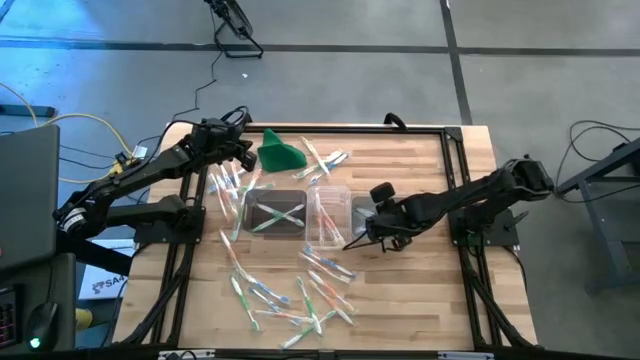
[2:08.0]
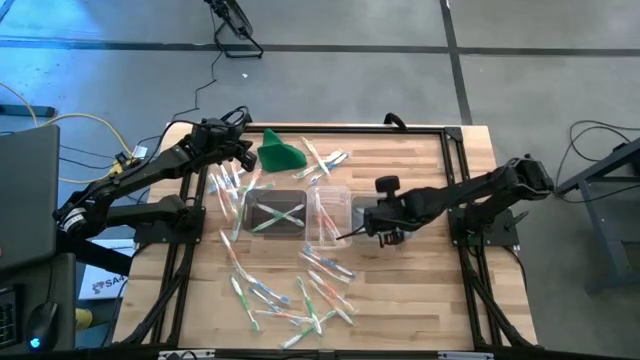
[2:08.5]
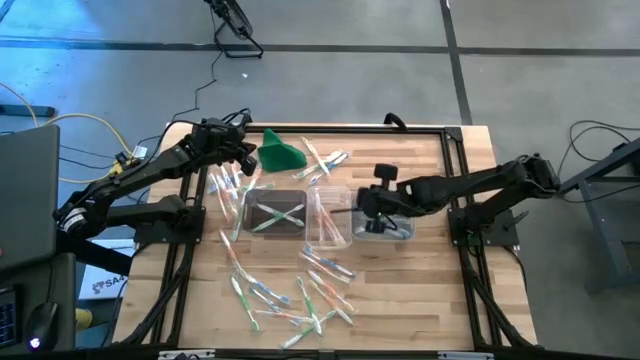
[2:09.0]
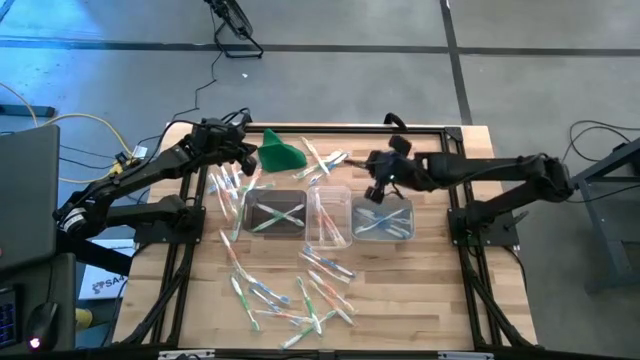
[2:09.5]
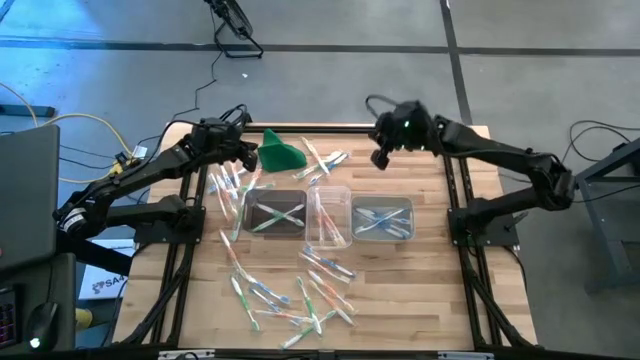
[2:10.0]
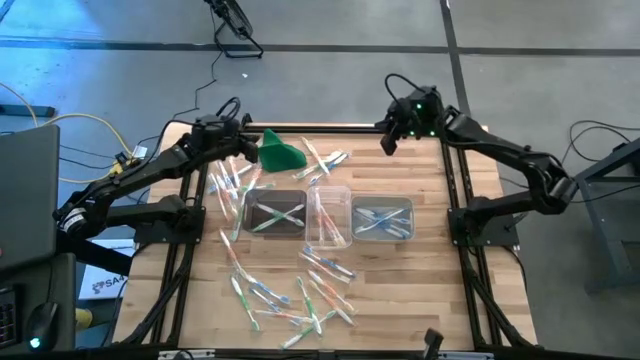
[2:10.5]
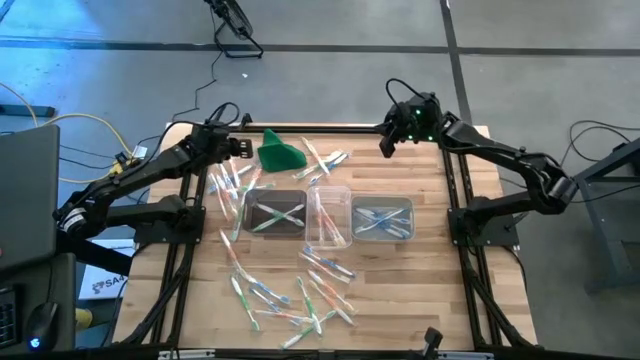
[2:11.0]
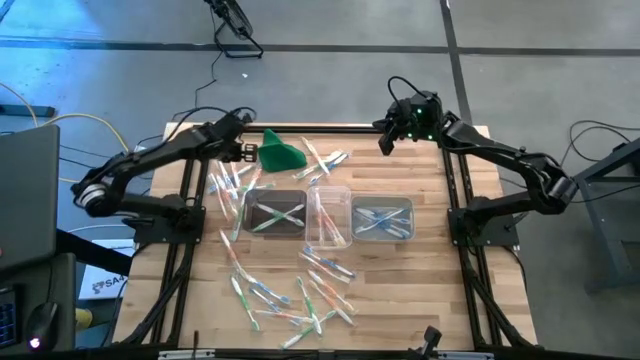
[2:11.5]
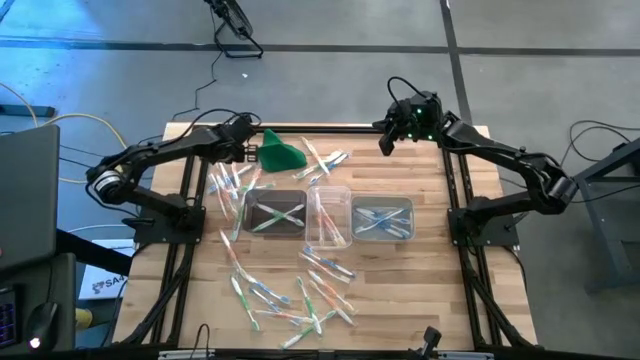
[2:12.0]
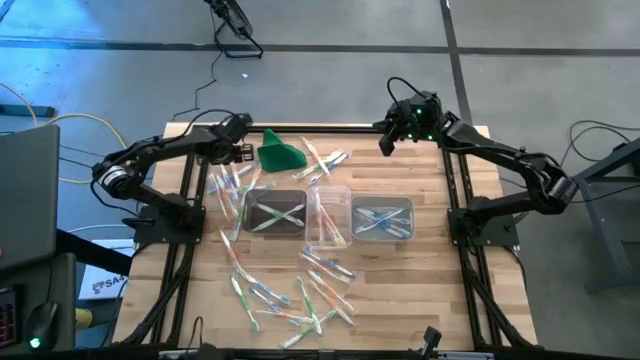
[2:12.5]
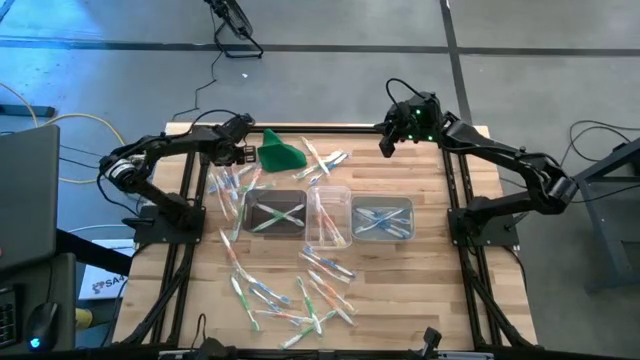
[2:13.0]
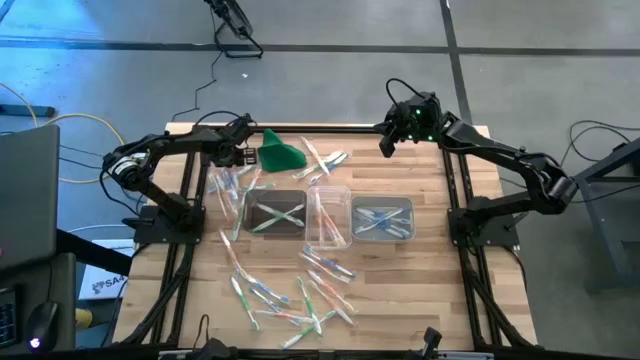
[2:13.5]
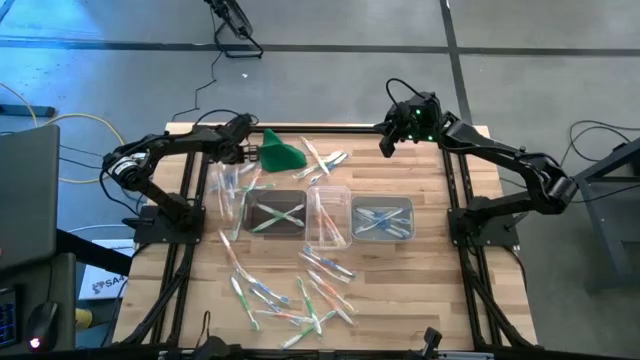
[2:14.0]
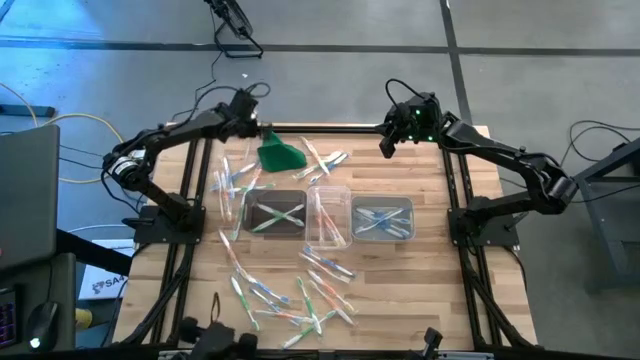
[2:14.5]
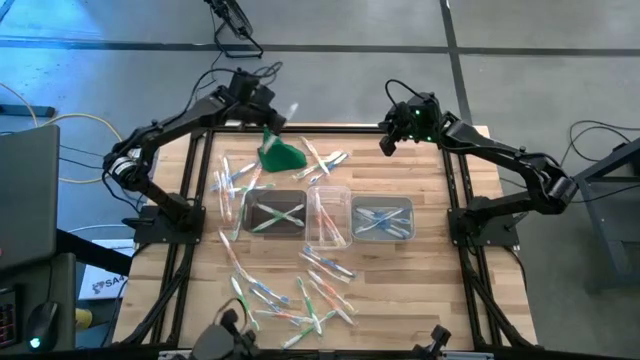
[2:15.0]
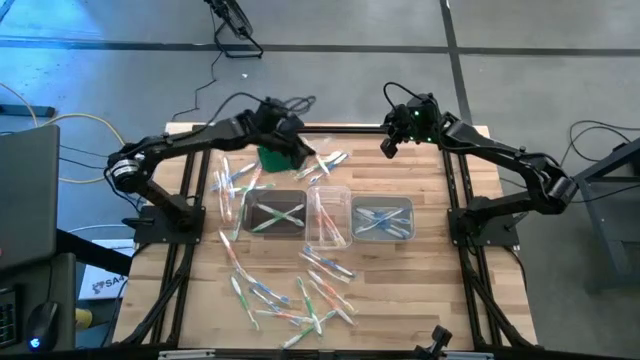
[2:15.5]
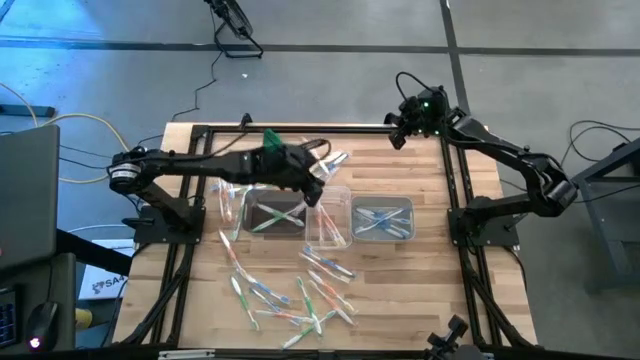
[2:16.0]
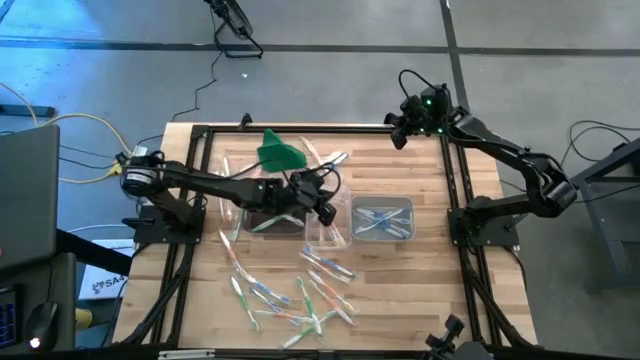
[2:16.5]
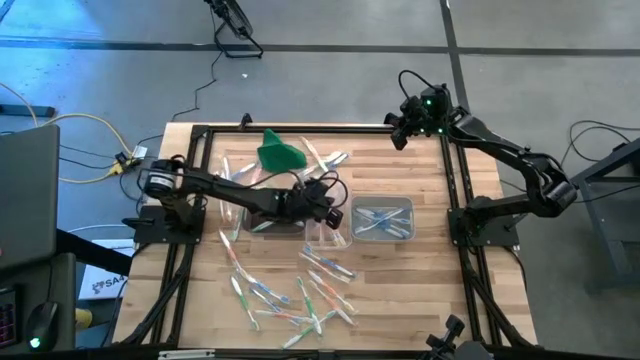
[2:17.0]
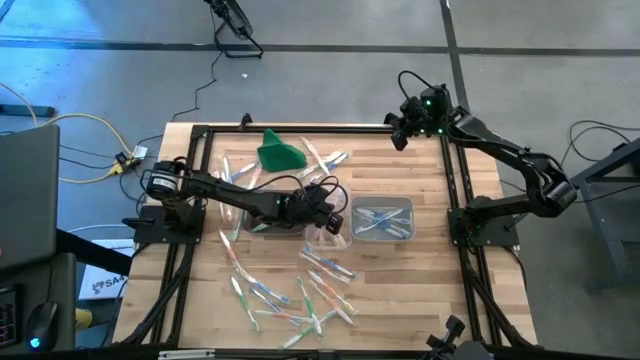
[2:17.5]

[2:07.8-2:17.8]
Task: Pick & Place Toothbrushes
Put the orange toothbrush into the transparent bin

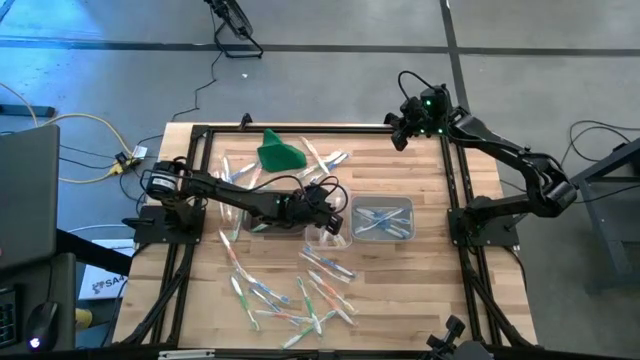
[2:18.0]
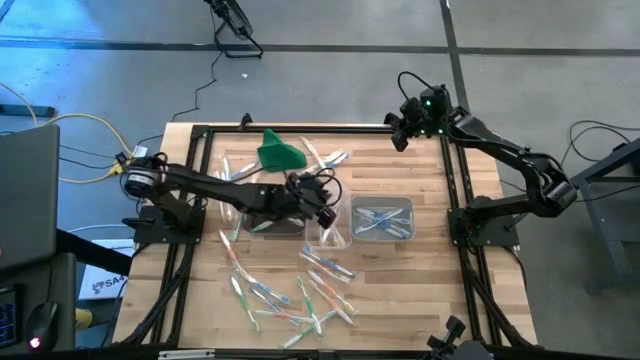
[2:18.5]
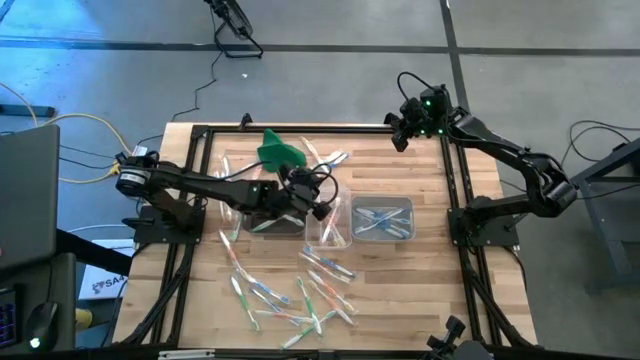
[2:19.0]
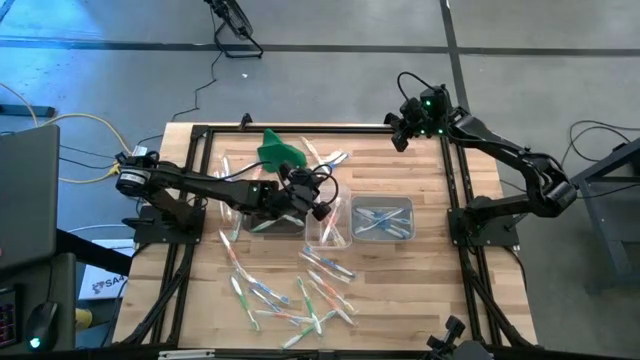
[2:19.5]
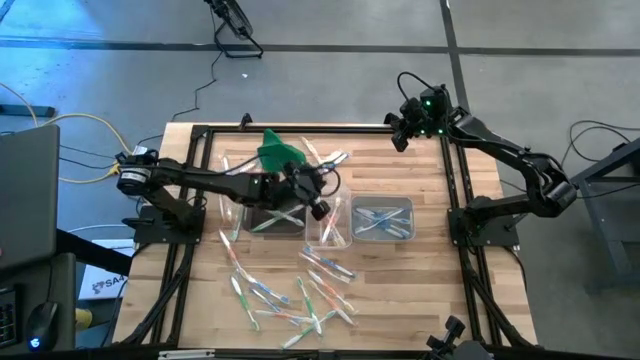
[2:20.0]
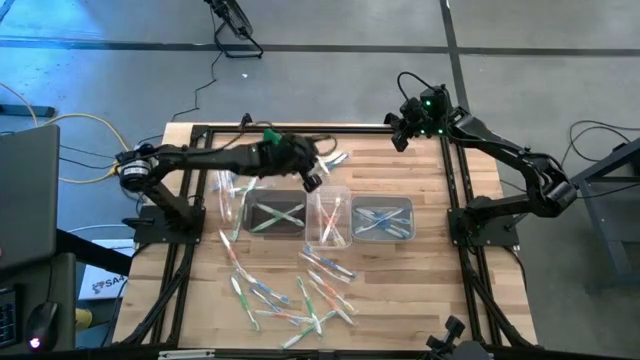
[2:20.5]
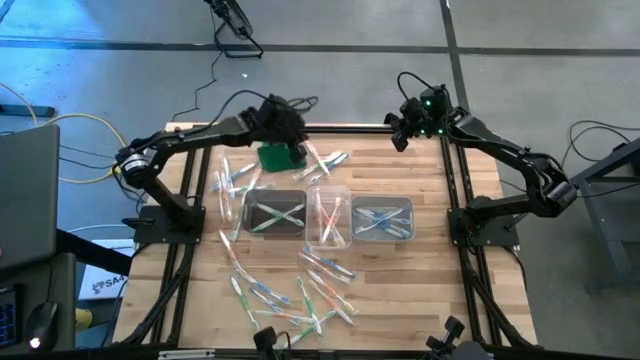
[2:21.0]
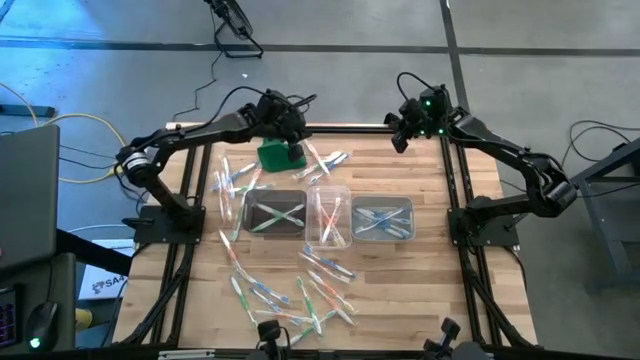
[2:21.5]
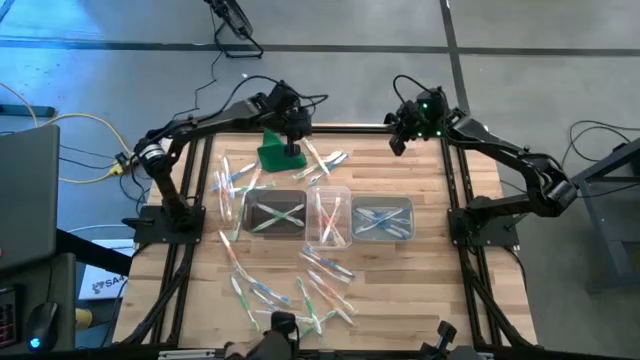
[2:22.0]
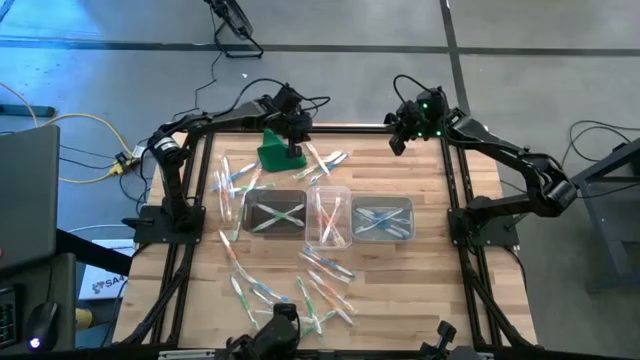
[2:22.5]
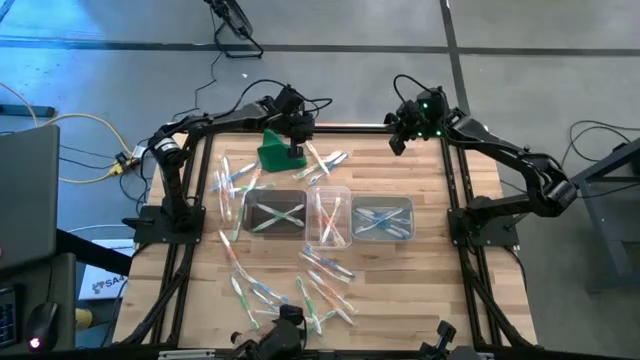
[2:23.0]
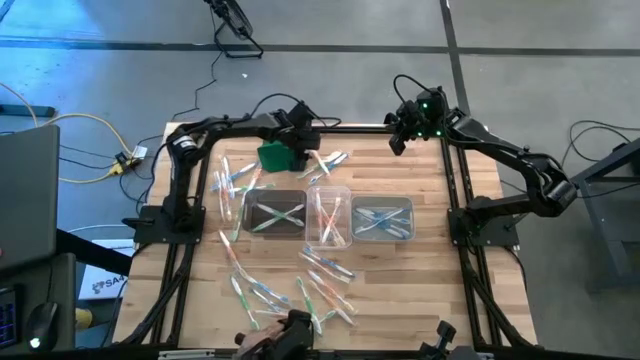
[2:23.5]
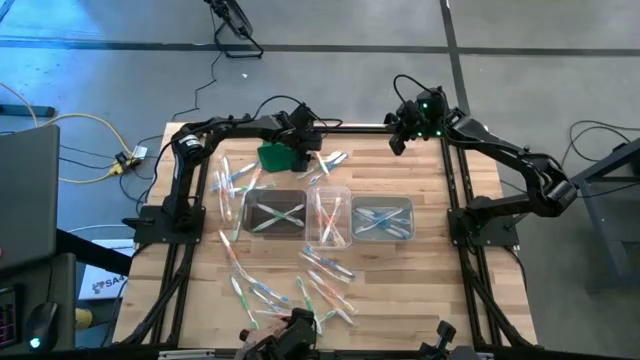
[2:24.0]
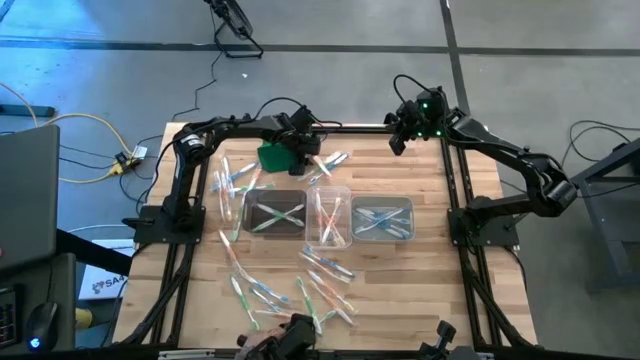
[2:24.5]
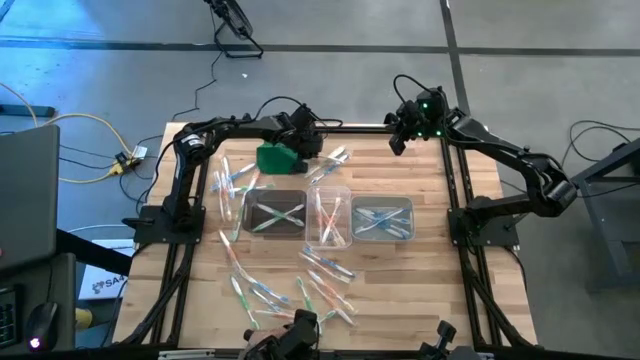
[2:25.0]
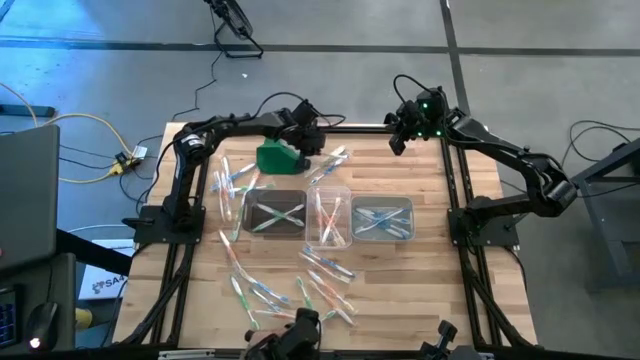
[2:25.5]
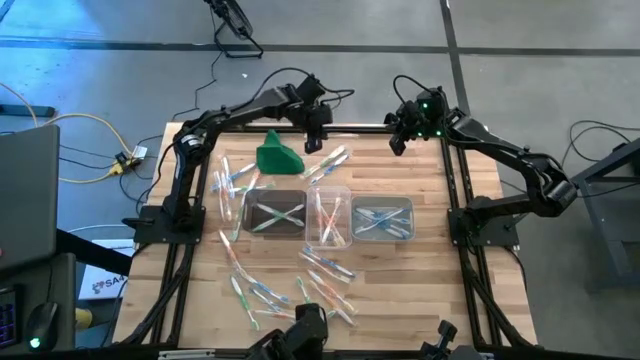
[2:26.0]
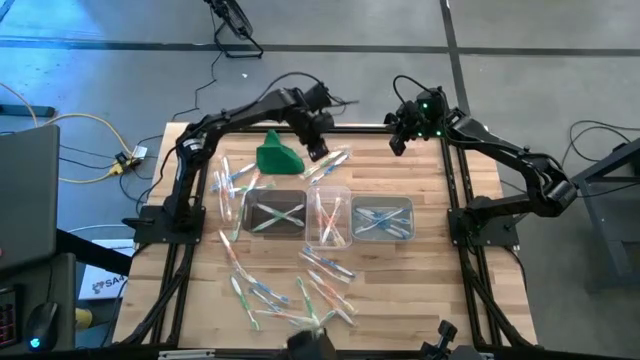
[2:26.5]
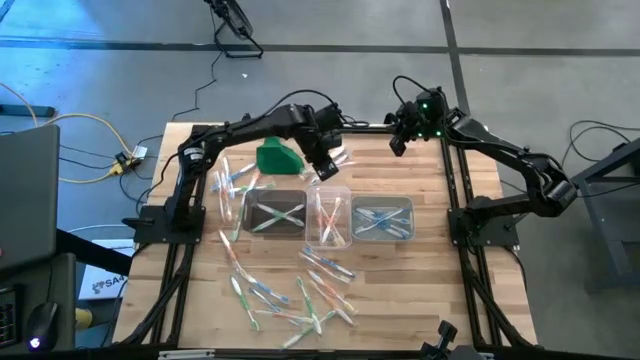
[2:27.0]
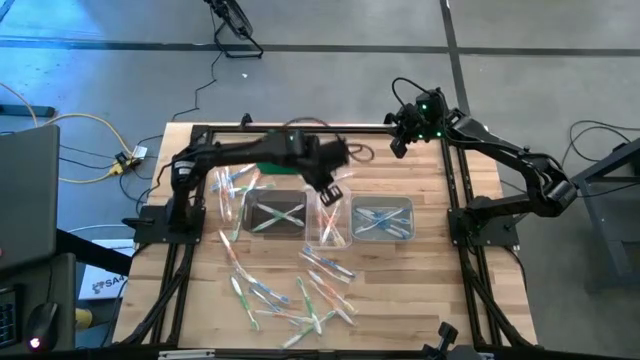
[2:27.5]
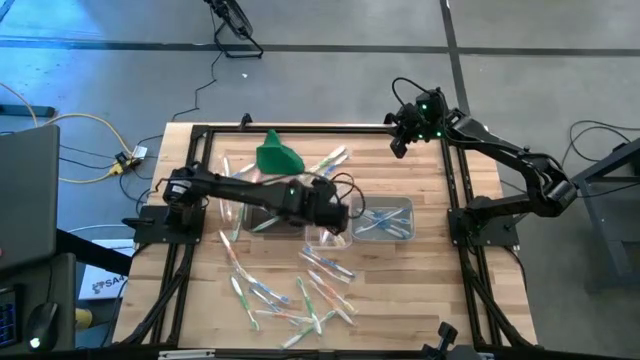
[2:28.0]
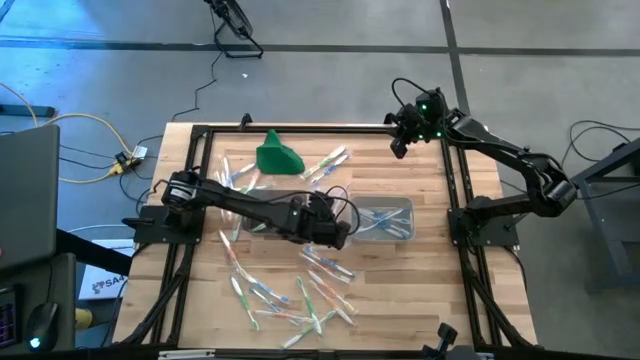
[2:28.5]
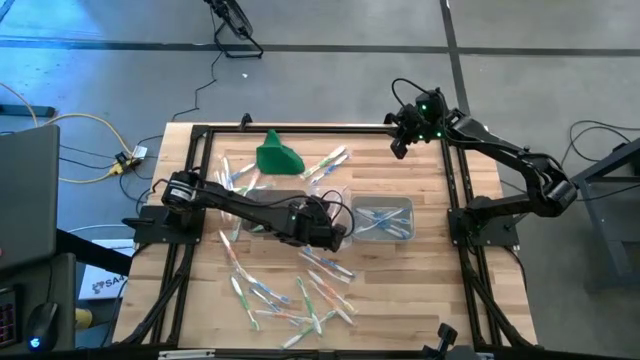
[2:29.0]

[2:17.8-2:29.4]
Put the orange toothbrush into the transparent bin
